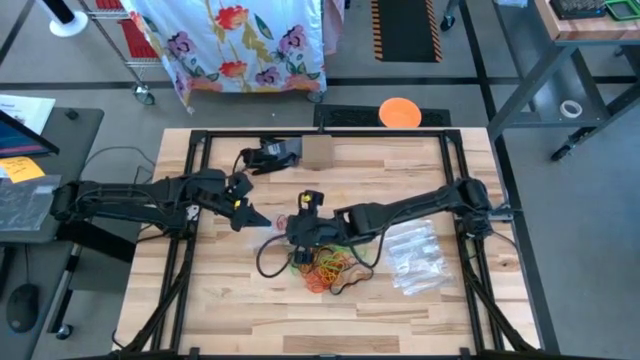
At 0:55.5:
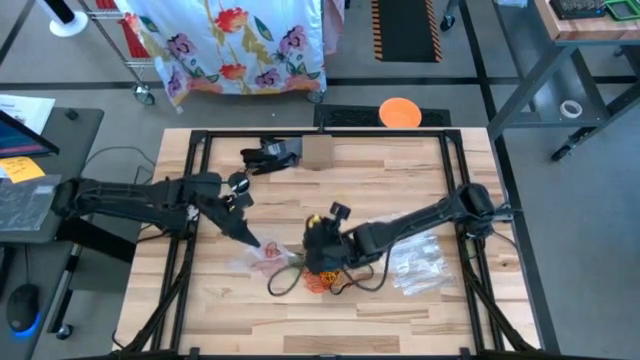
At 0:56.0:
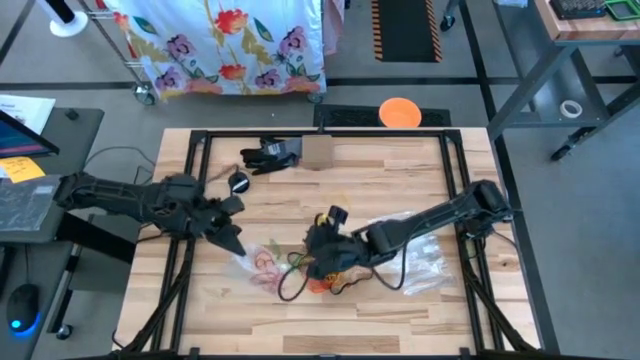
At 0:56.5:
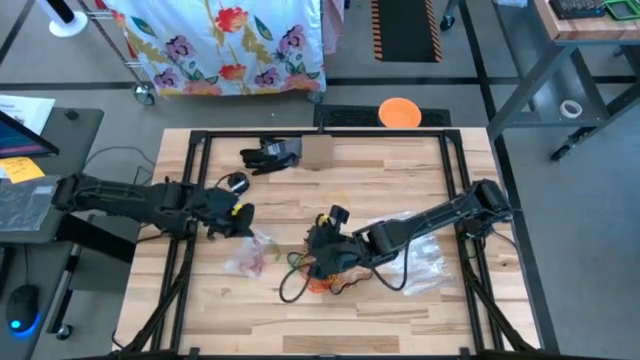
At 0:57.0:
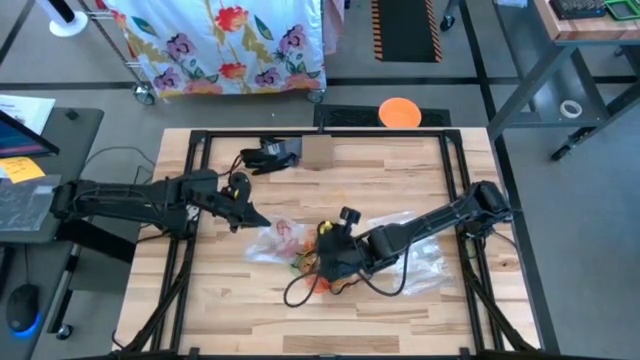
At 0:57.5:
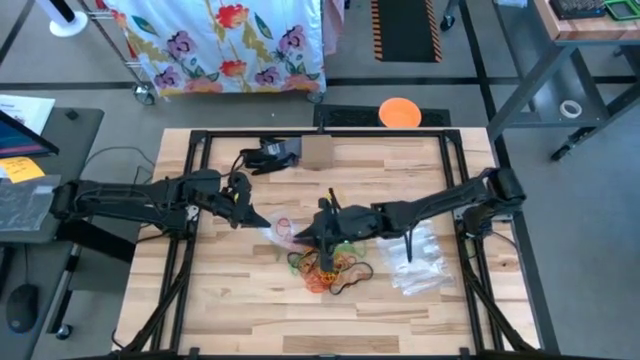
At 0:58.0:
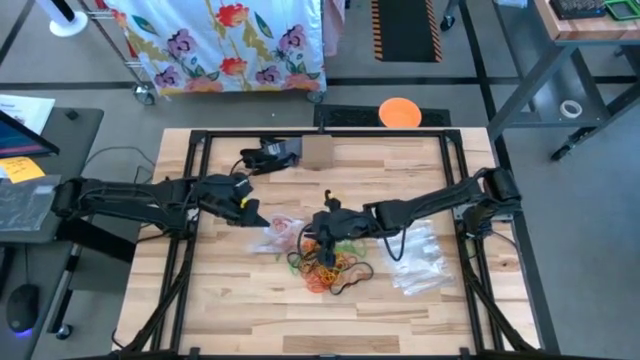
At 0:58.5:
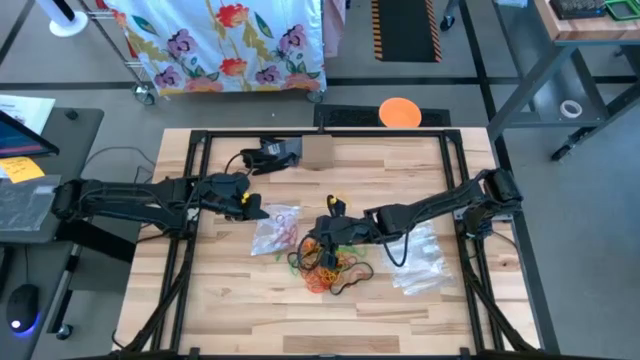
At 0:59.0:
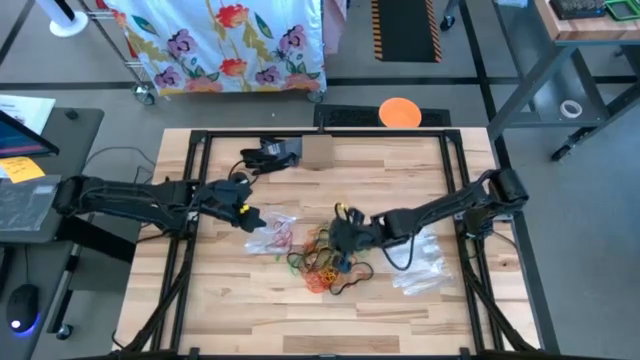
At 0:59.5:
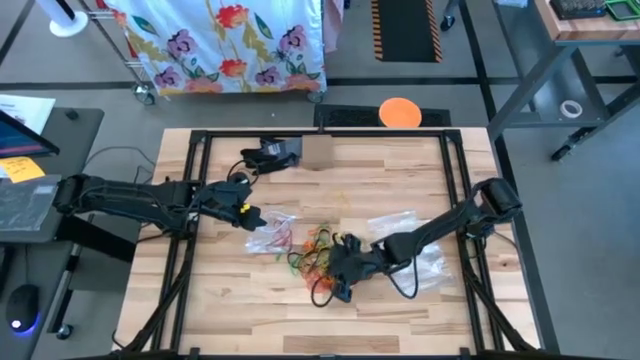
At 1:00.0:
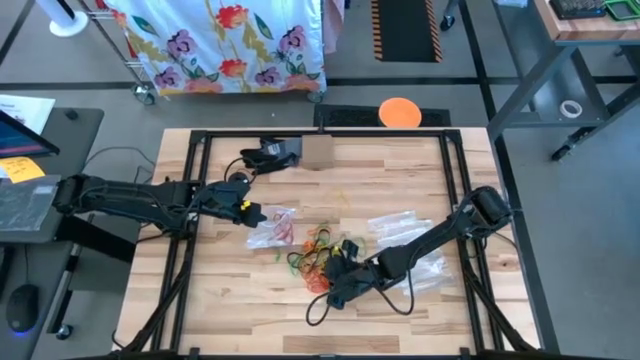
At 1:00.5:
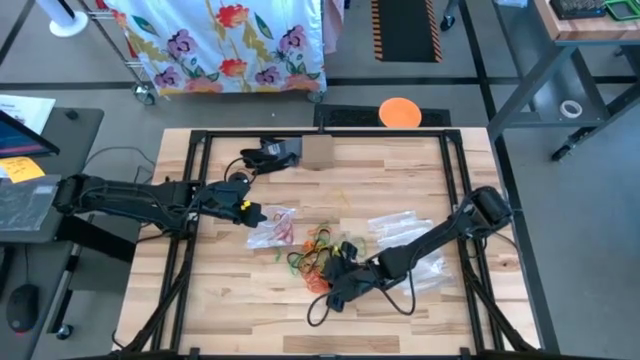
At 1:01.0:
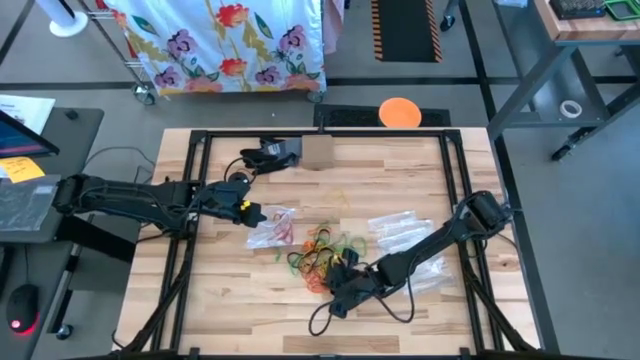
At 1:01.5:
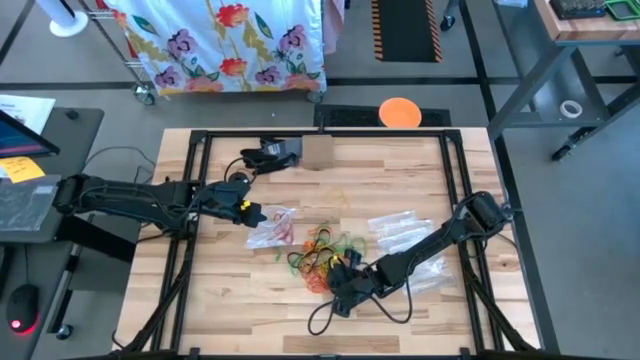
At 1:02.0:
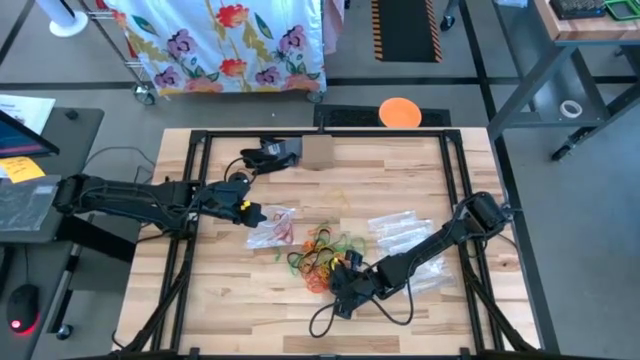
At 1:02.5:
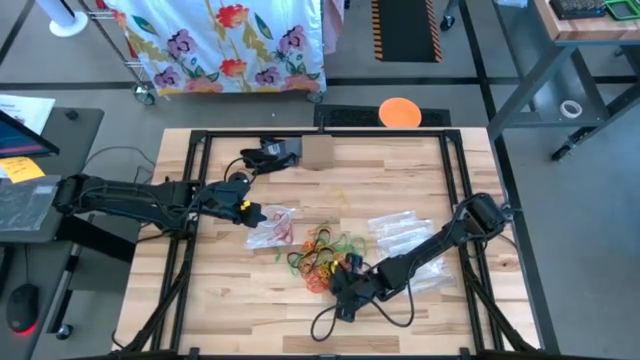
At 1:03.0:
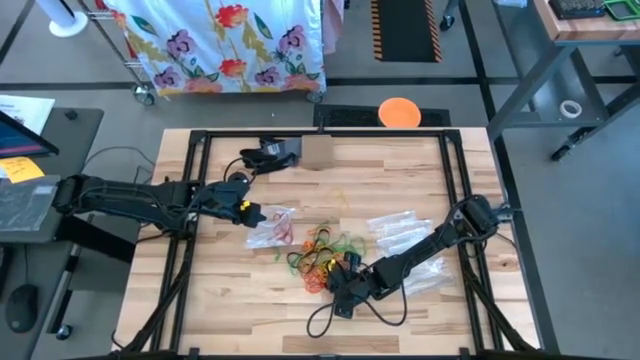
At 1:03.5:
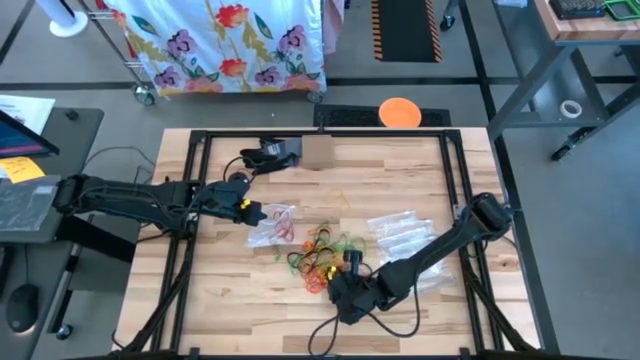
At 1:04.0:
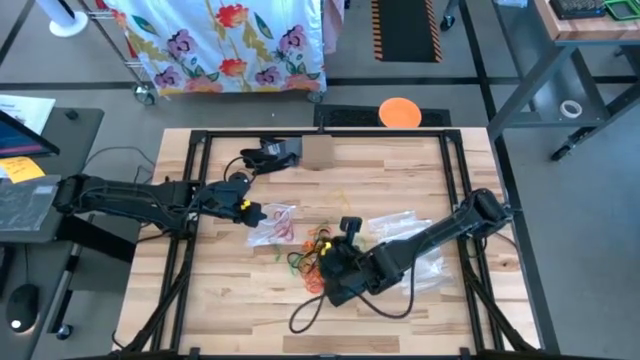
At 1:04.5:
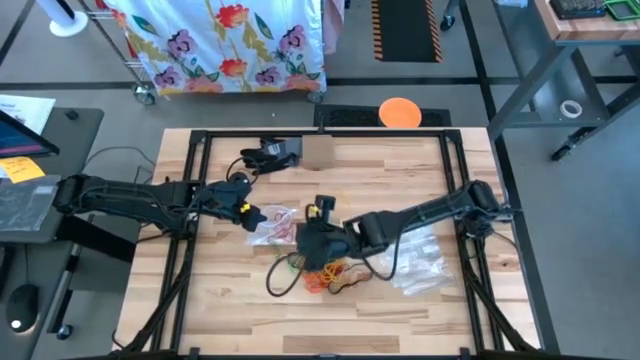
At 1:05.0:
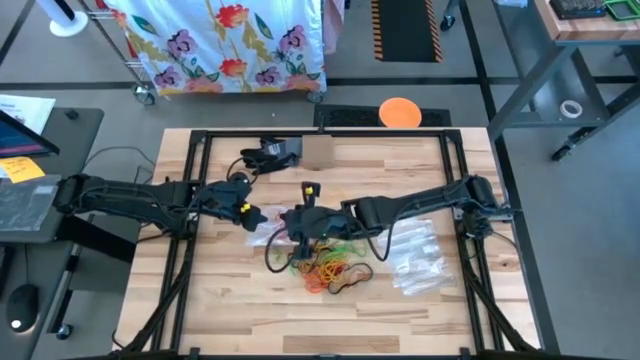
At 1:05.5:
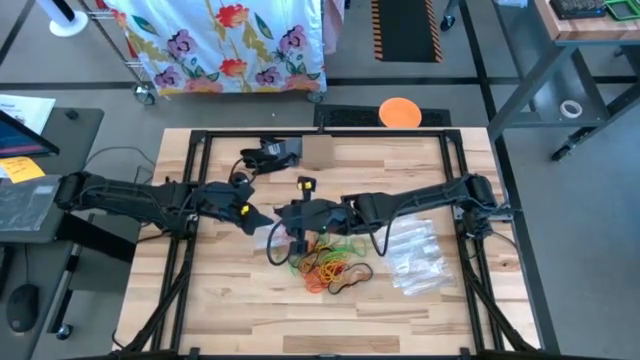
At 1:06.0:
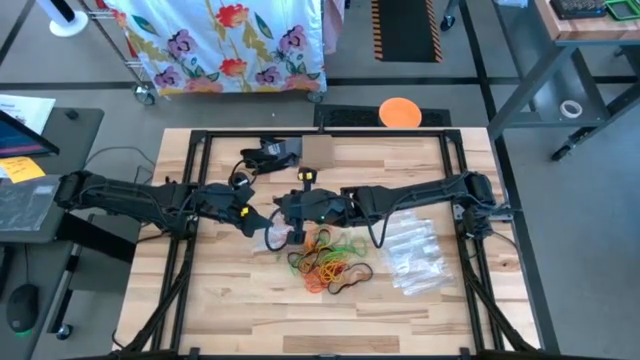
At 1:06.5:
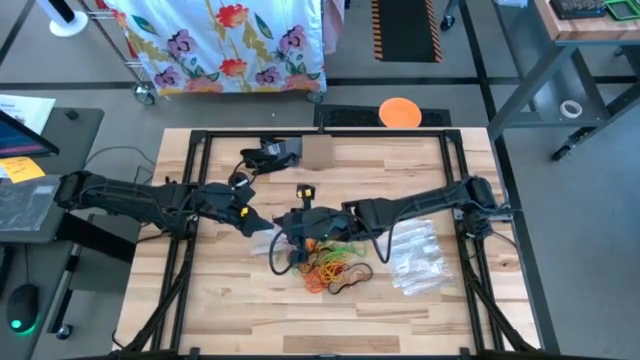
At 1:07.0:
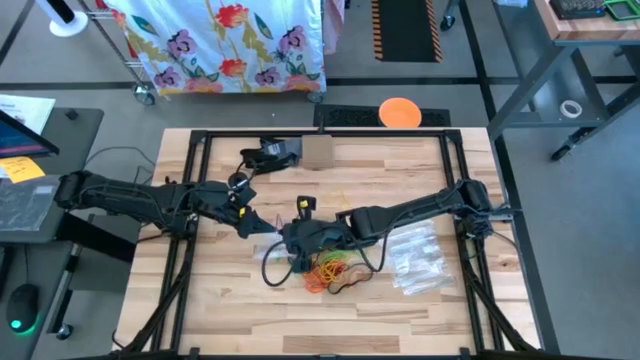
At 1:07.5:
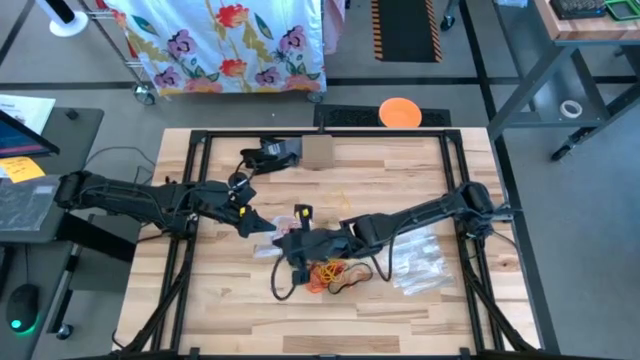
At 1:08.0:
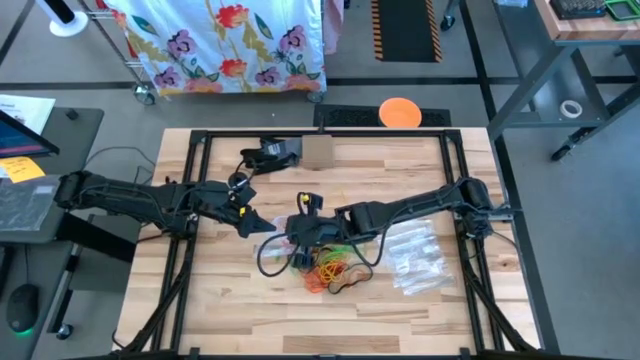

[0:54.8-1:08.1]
Task: Sort rubber bands
Put the red rubber band into the transparent zip bag

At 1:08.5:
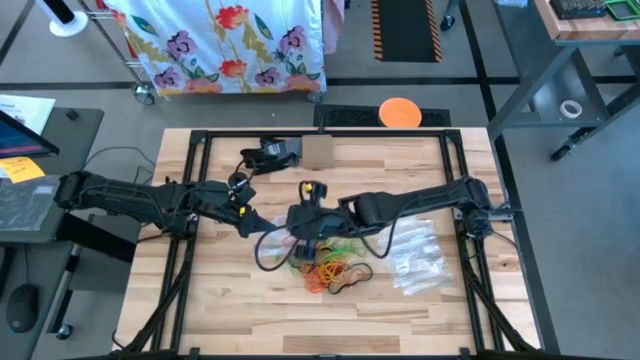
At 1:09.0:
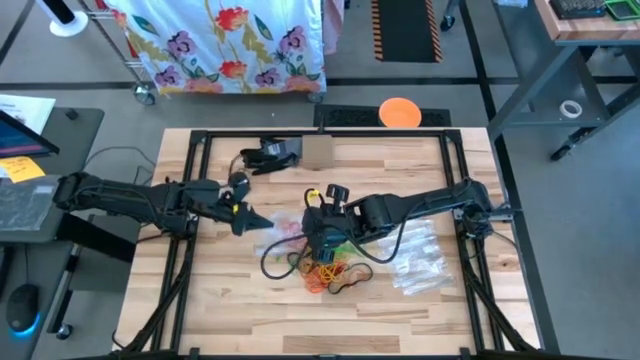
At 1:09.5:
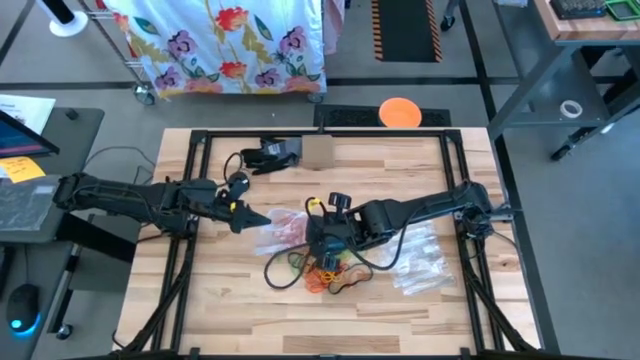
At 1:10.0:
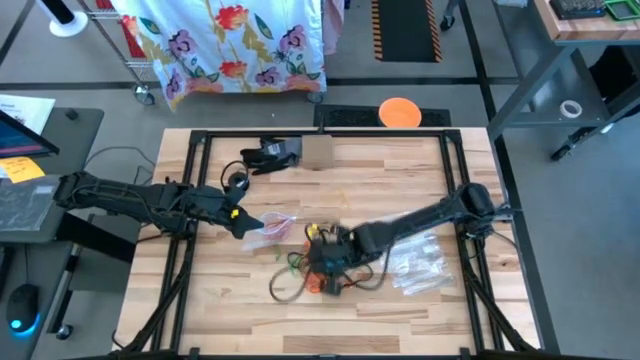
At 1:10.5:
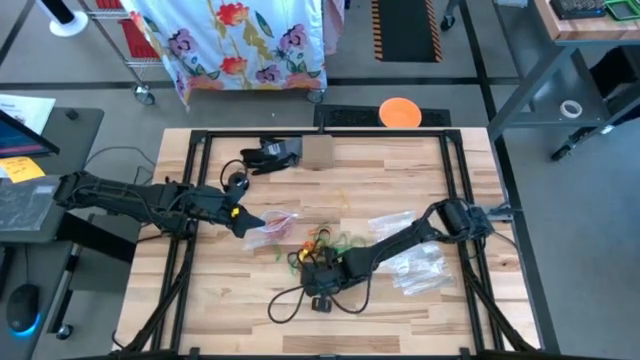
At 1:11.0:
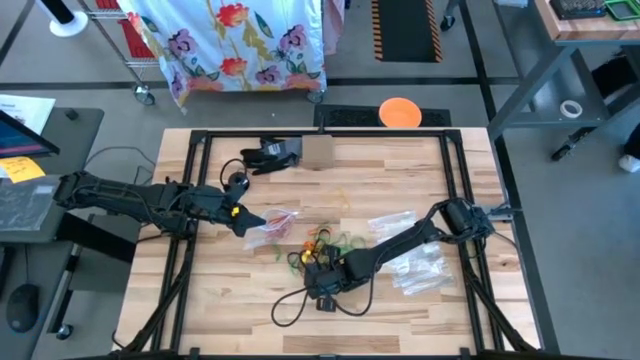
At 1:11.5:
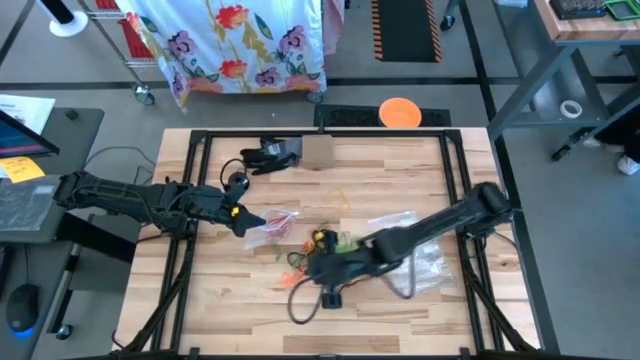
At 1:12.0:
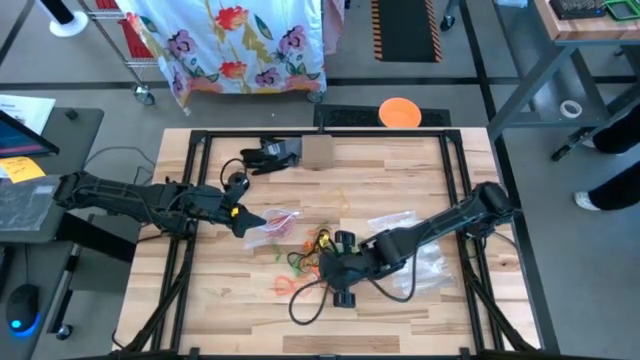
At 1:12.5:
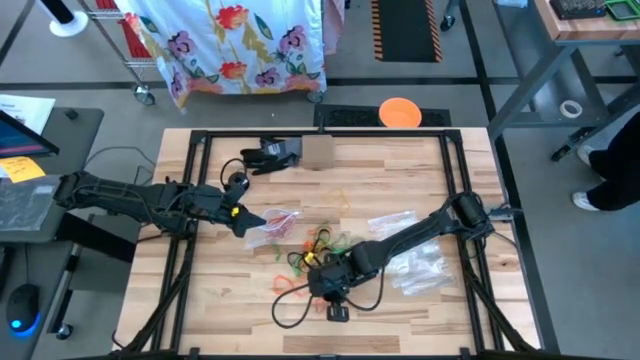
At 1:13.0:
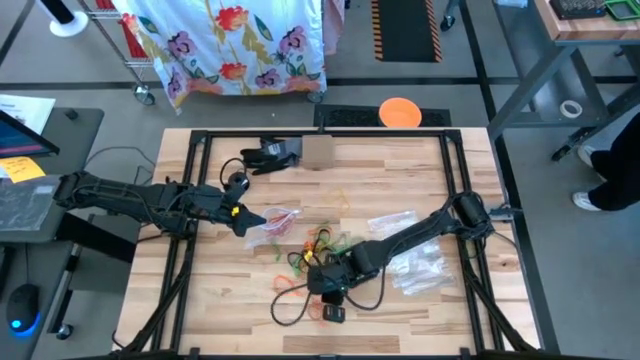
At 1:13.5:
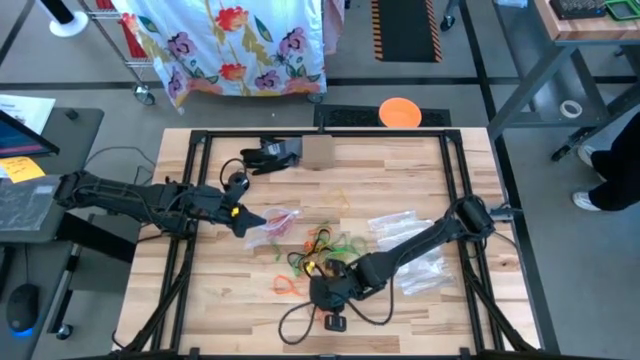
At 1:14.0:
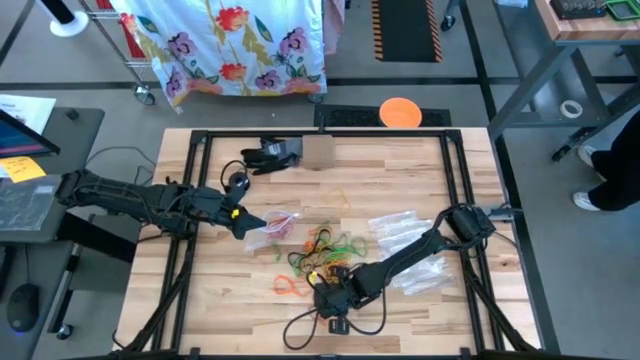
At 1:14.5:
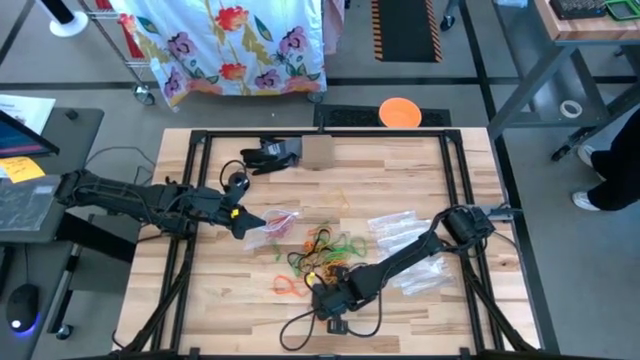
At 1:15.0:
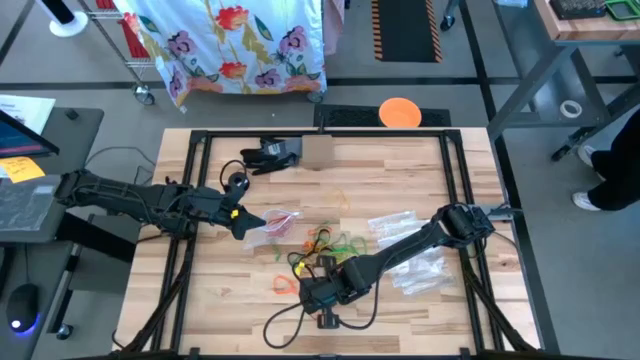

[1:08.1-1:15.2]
Put the red rubber band into the transparent zip bag

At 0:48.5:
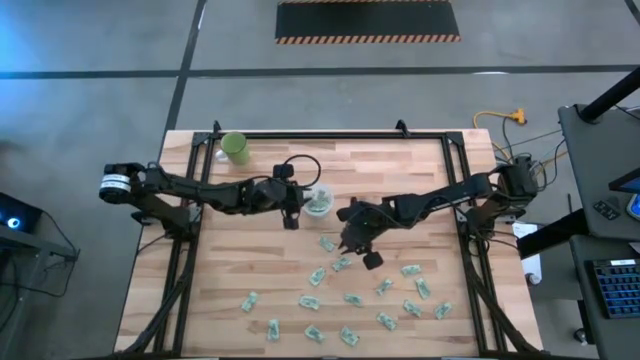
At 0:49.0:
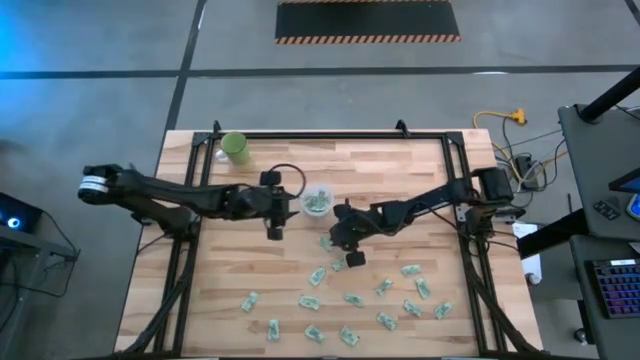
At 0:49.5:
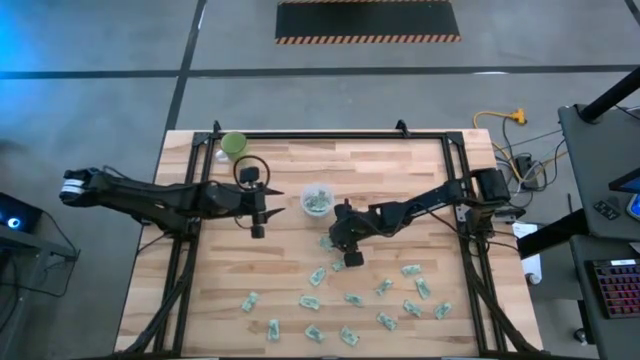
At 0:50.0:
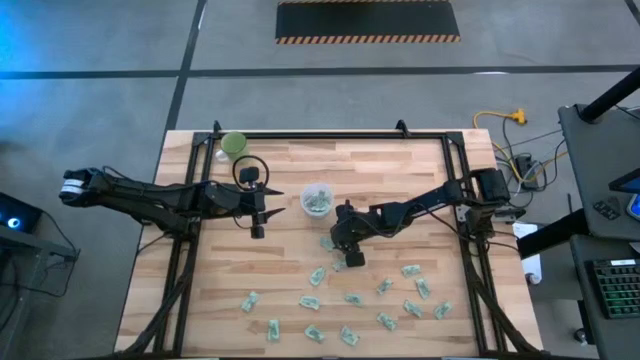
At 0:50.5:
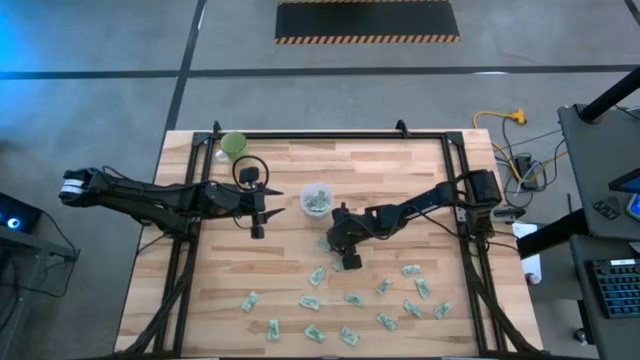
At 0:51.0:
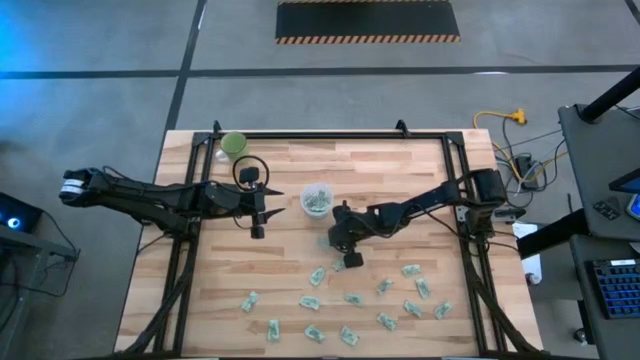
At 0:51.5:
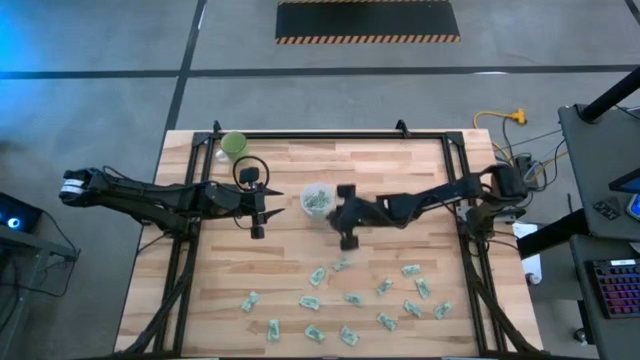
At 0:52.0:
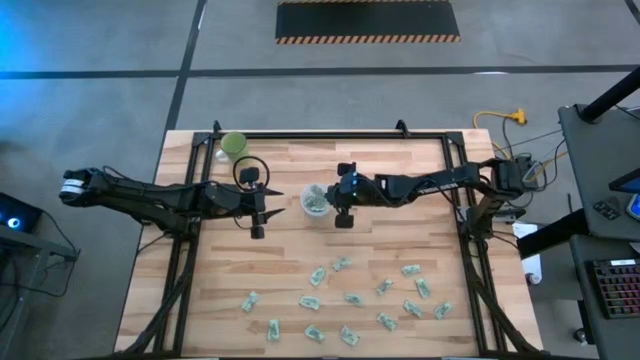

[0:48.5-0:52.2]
Task: Pick and place Stevia / Truvia into bins
Put the green stevia packet into the transparent container
